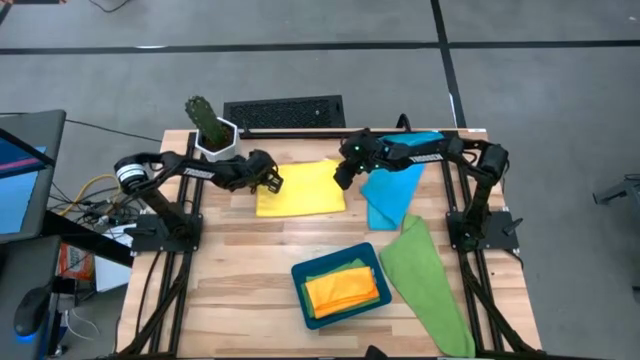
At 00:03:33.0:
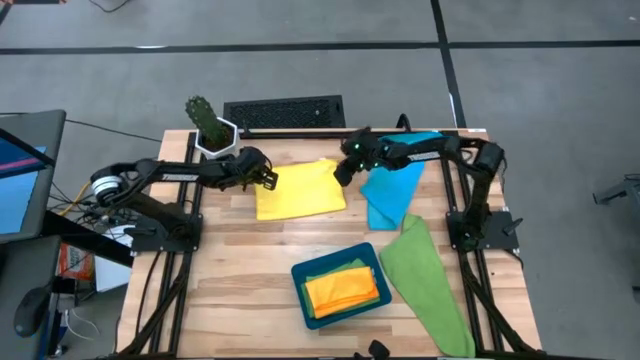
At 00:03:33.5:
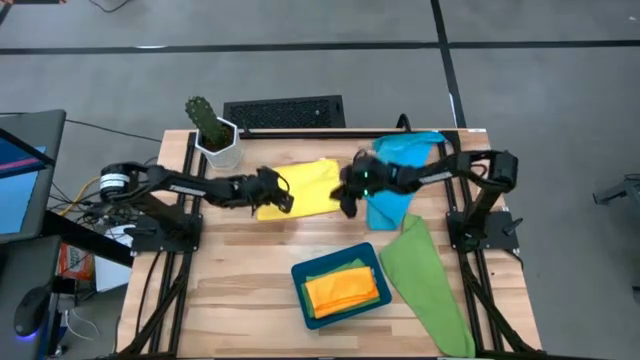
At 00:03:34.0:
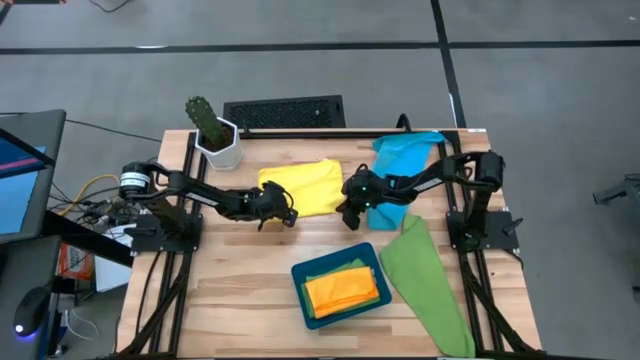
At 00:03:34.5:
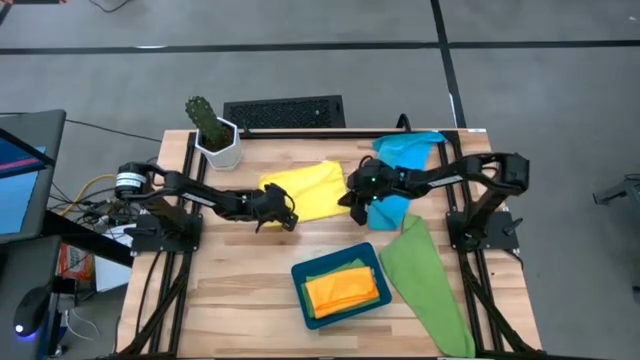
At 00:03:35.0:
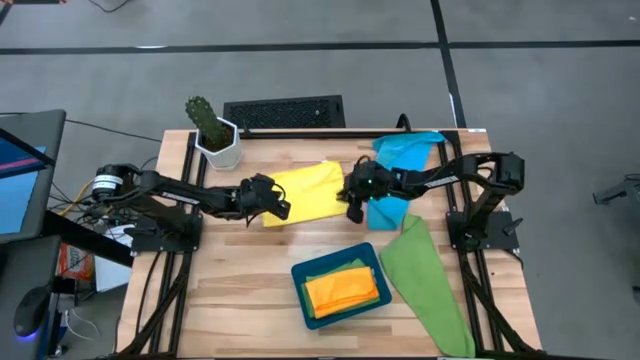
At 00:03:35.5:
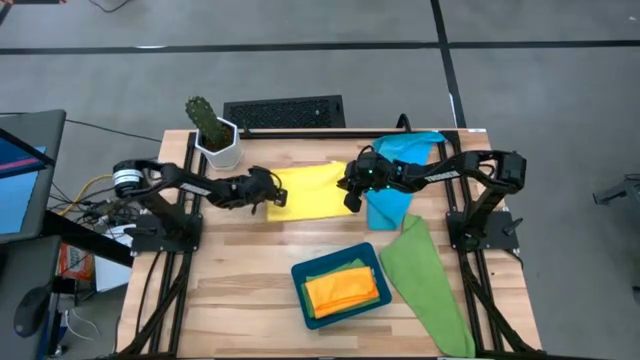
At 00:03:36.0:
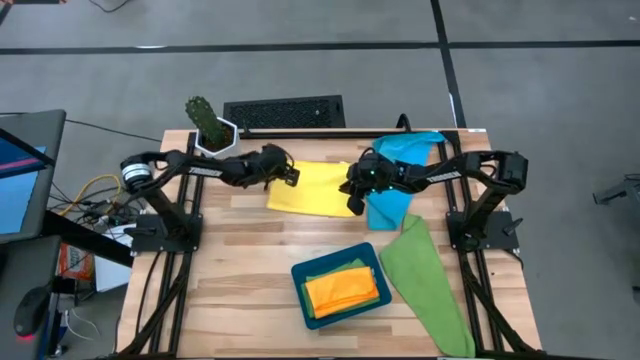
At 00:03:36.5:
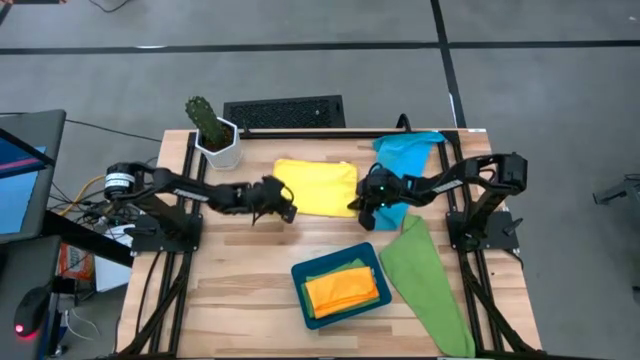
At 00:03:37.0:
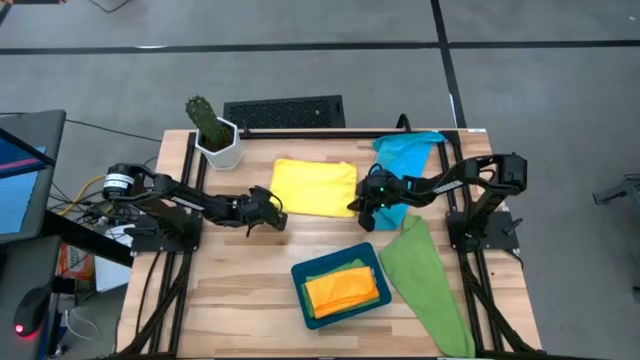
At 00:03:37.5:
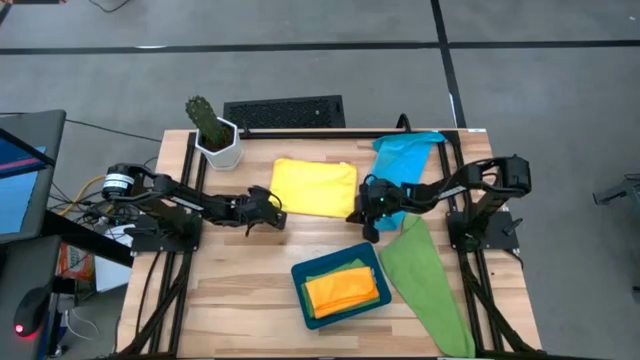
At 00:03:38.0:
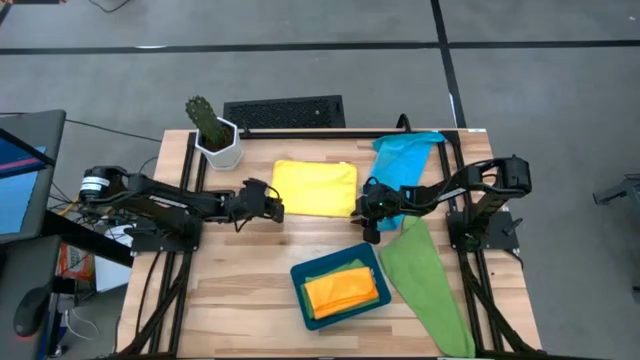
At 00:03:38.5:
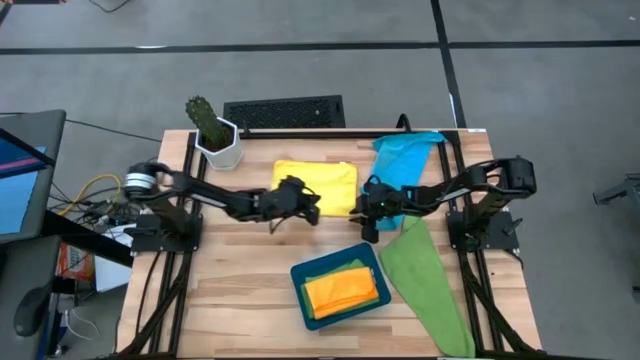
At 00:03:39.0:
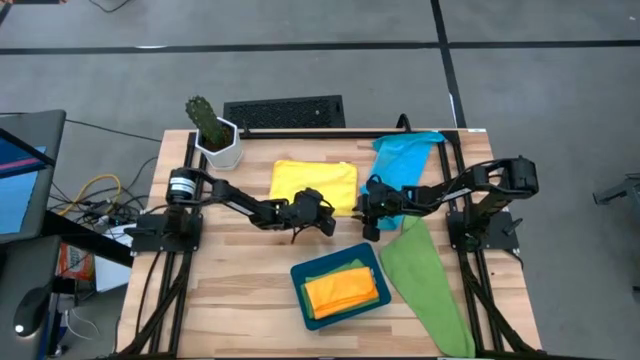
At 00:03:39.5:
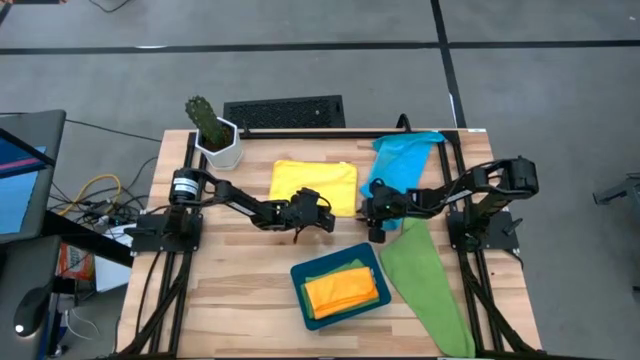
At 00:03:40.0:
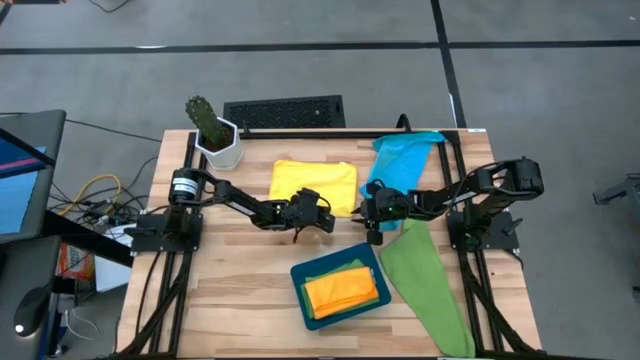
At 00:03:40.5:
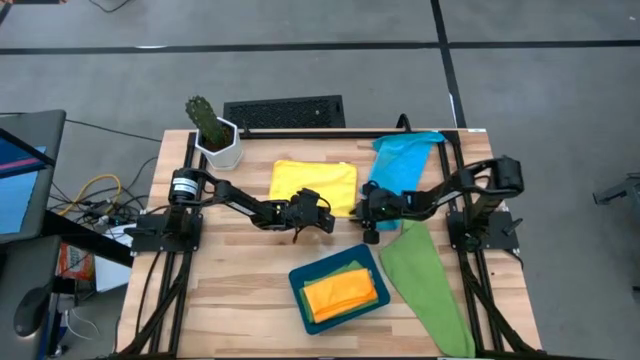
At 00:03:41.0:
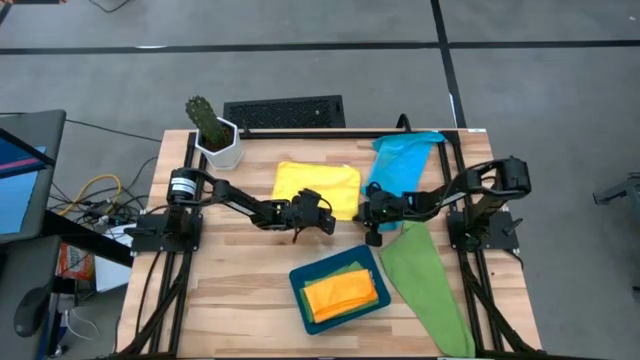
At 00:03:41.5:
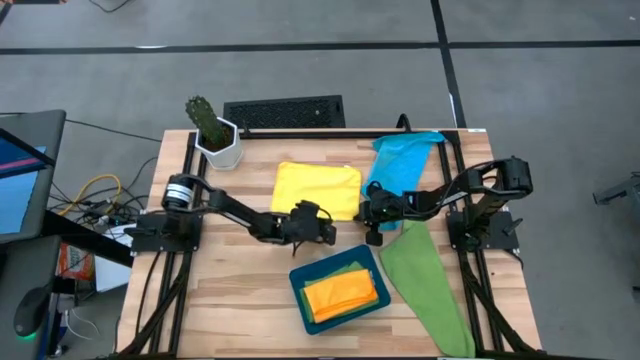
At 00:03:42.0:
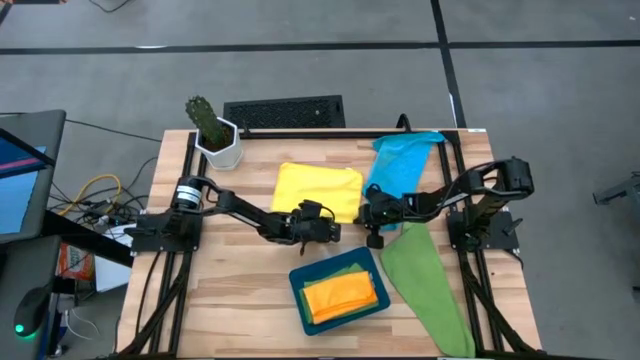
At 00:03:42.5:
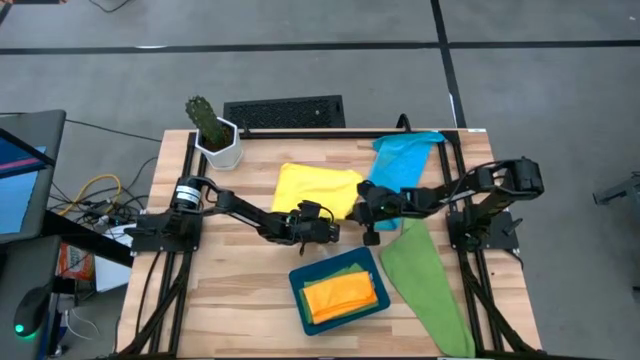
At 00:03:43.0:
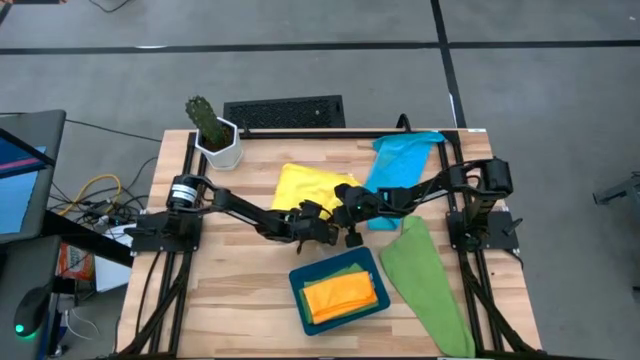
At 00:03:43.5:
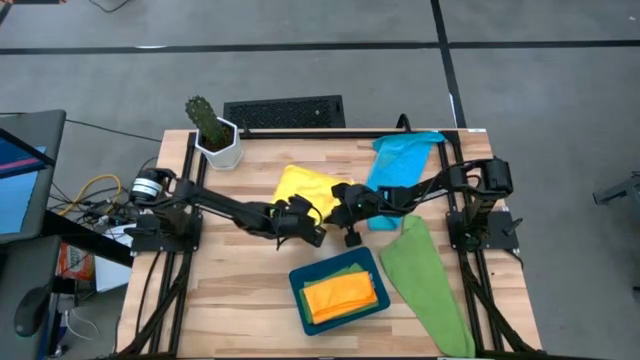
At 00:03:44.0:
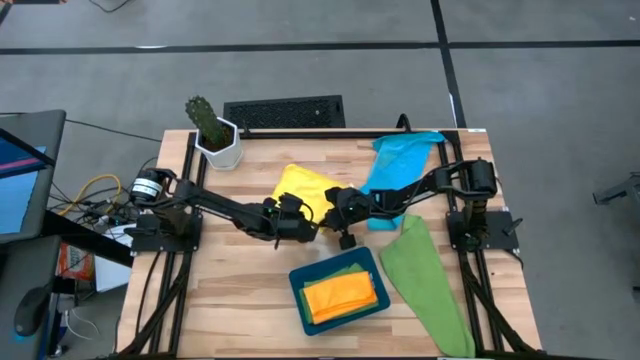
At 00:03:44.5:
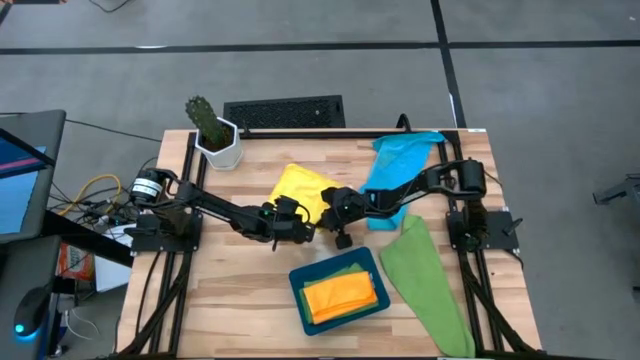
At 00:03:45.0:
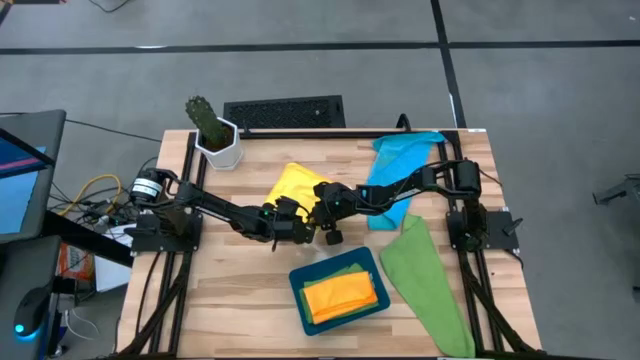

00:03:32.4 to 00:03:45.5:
Task: Fold microfiber towels
Fold the yellow microfiber towel

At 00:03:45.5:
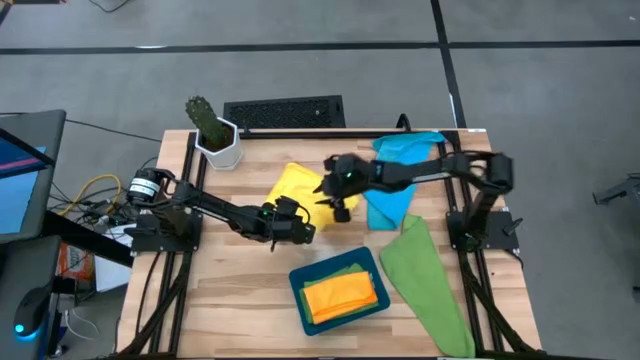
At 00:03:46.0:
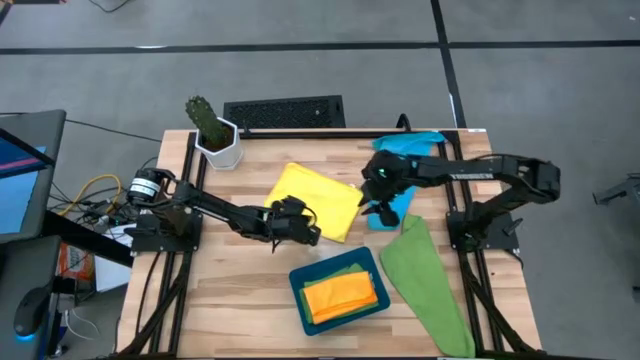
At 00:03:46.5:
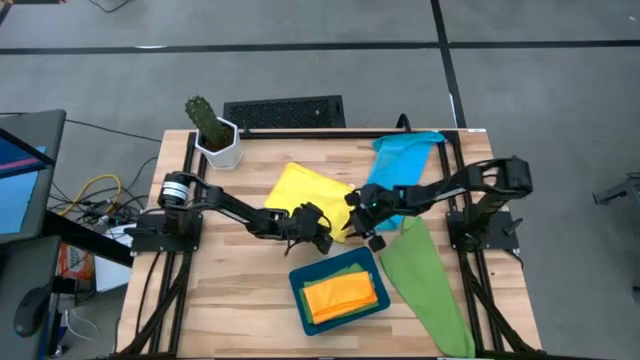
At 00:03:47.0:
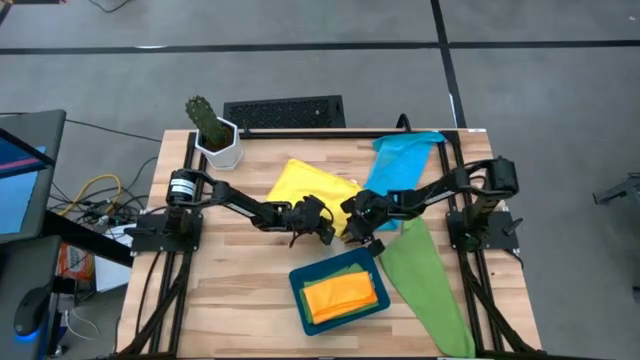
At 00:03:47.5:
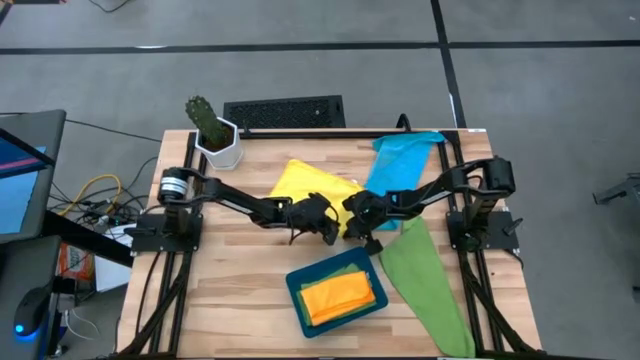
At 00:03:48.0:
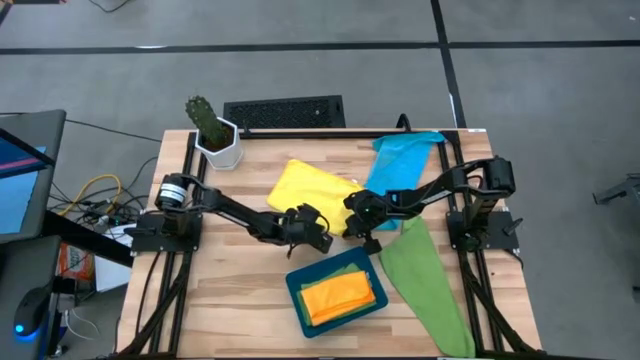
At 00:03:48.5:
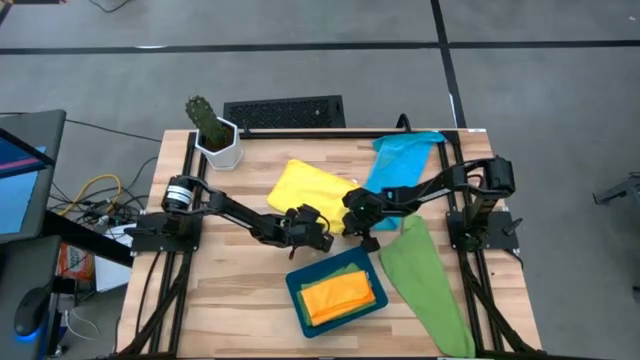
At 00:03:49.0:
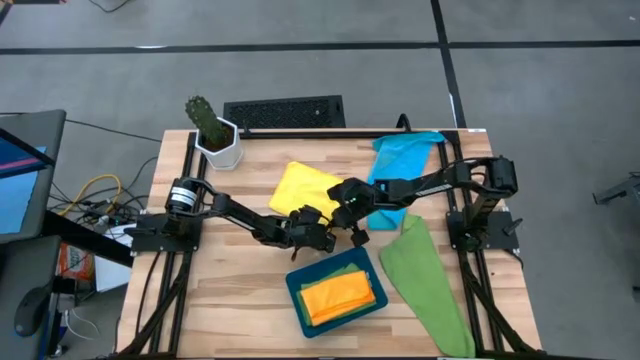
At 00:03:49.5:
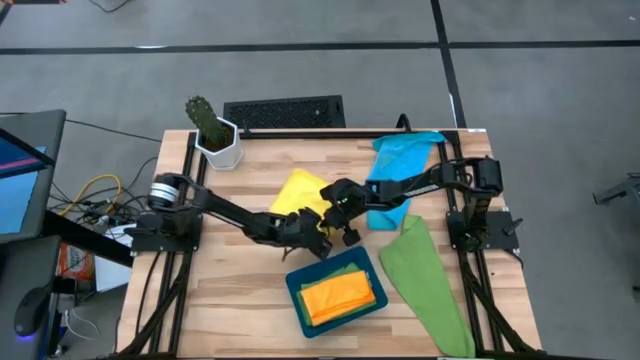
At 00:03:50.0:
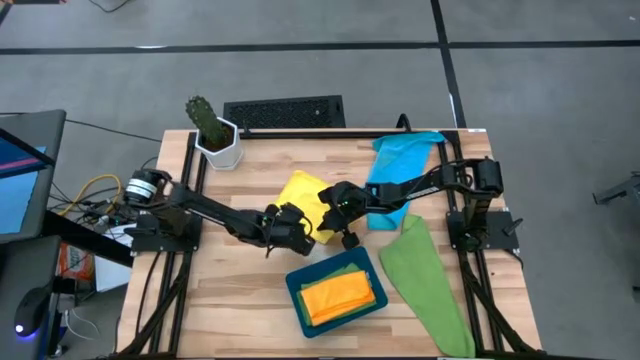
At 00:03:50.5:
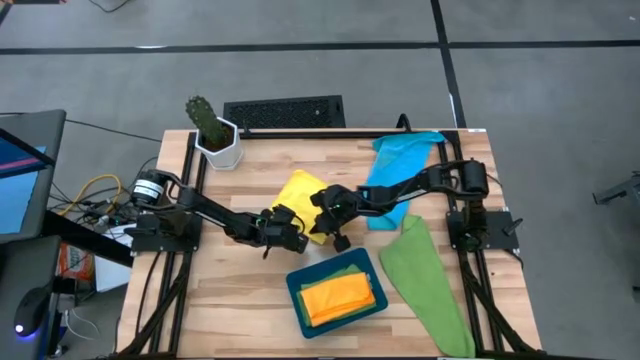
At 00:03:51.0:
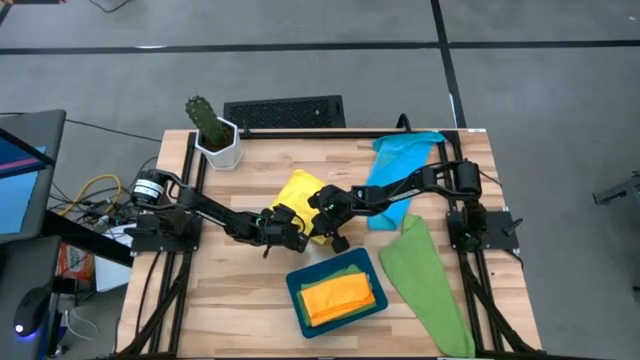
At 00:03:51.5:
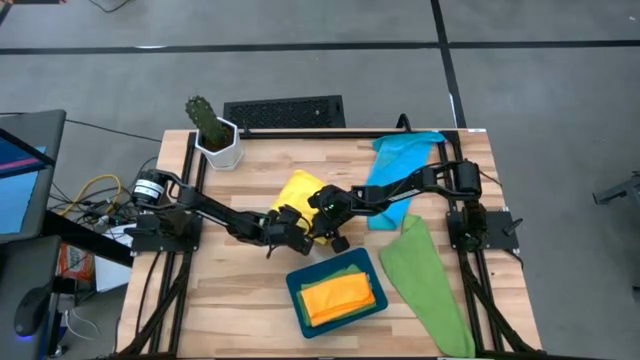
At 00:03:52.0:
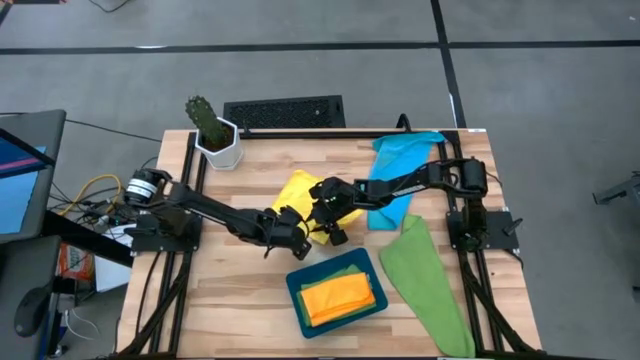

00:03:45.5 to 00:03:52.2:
Fold the yellow microfiber towel
